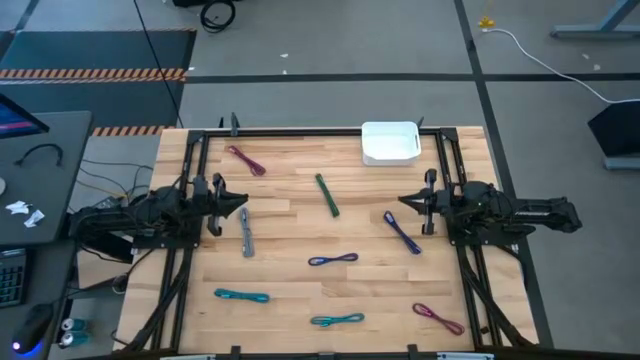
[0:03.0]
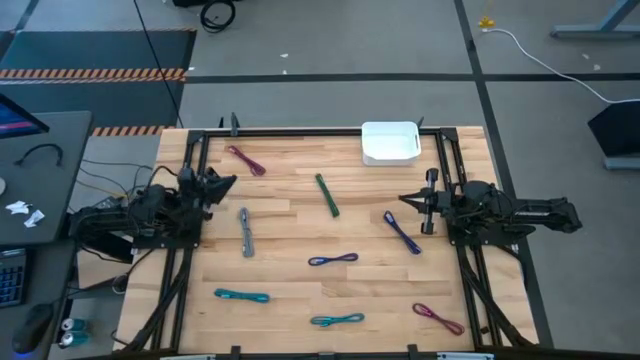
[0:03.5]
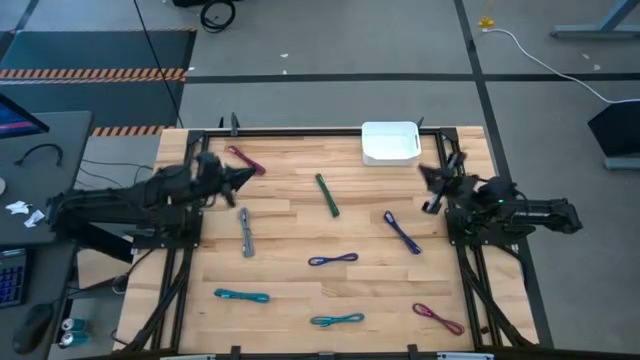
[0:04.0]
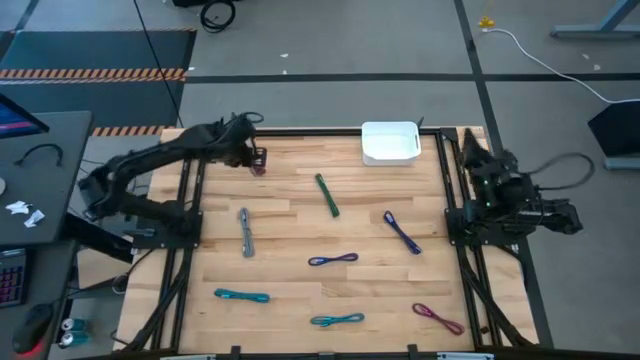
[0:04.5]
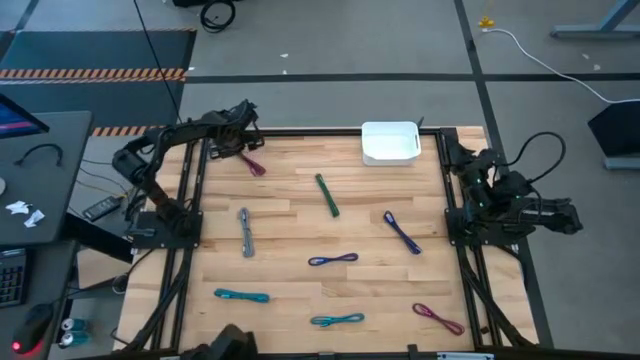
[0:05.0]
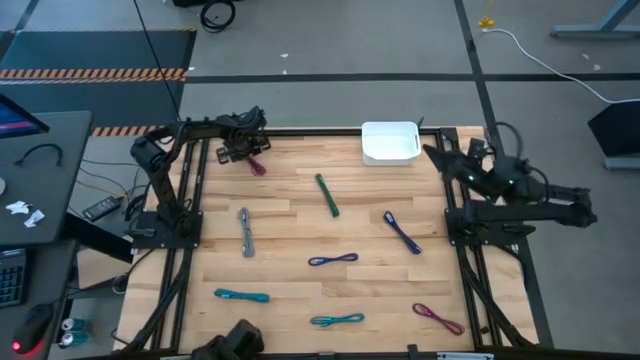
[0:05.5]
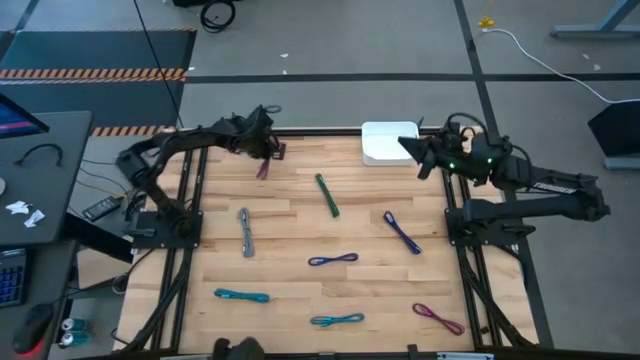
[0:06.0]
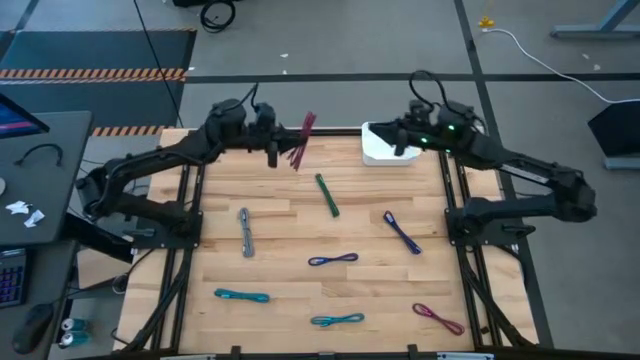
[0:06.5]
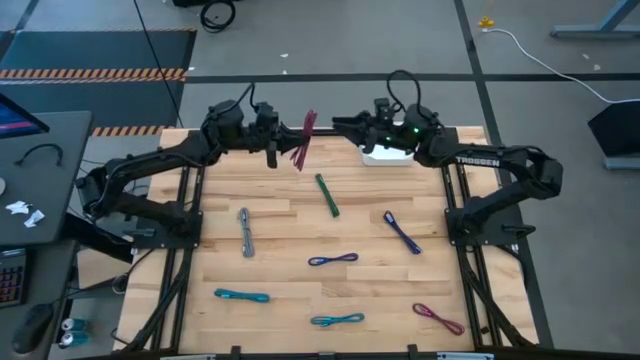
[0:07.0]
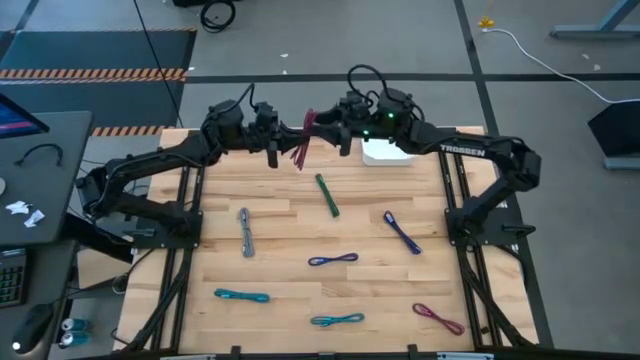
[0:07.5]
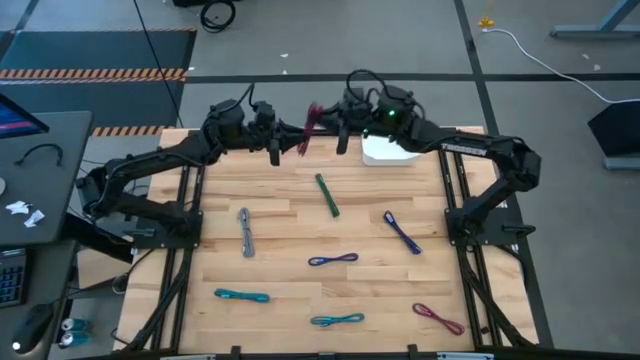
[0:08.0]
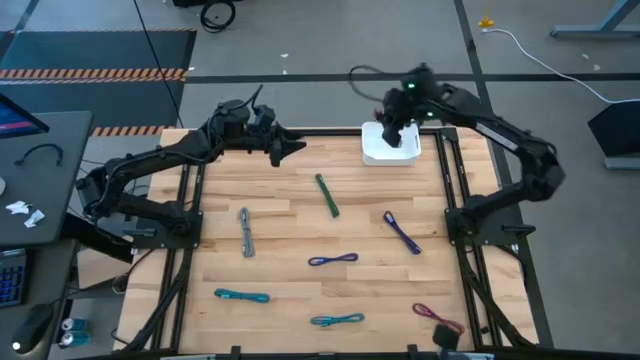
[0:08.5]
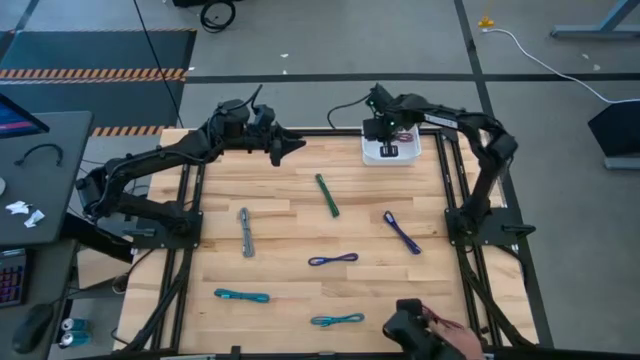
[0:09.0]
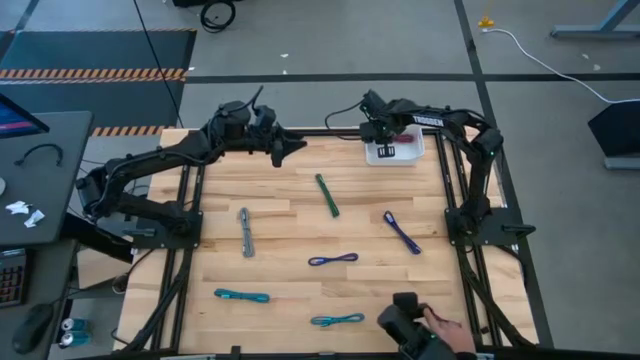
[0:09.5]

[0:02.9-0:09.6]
Task: Pick and place USB-C Cables
Put the top pink charger cable into the bin

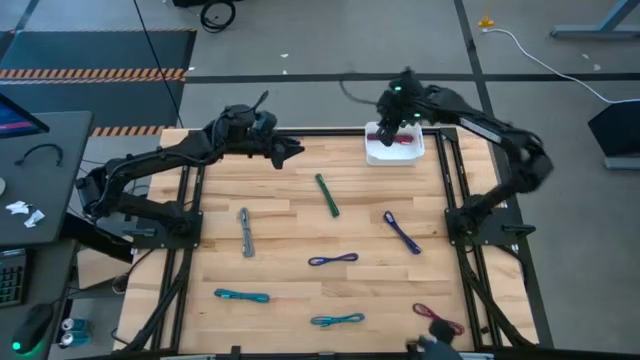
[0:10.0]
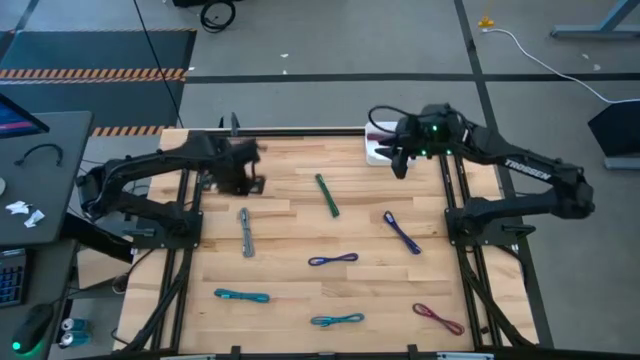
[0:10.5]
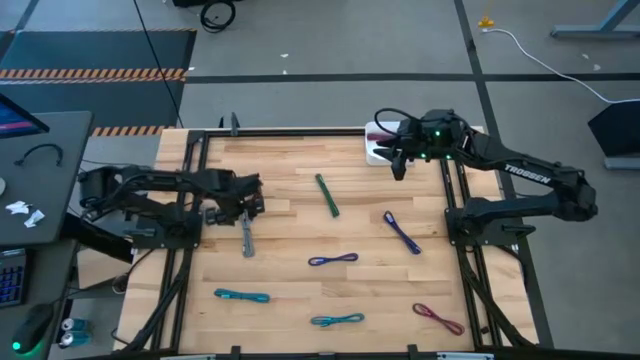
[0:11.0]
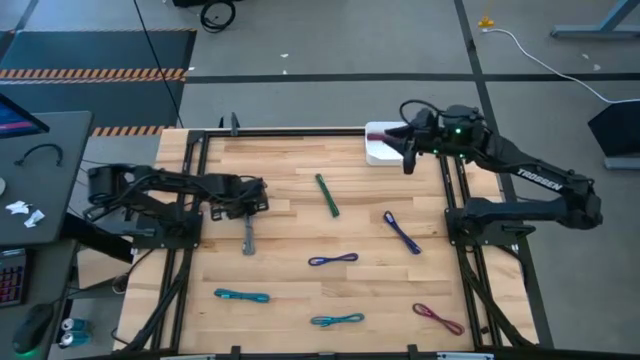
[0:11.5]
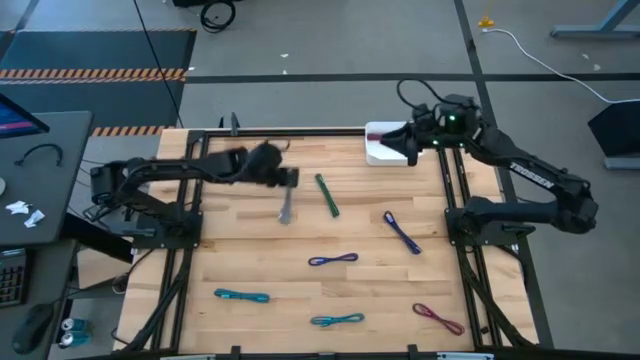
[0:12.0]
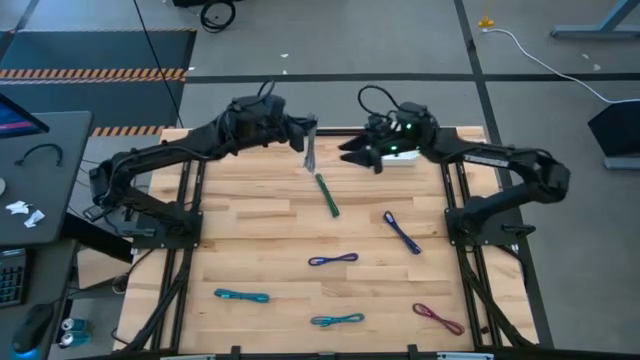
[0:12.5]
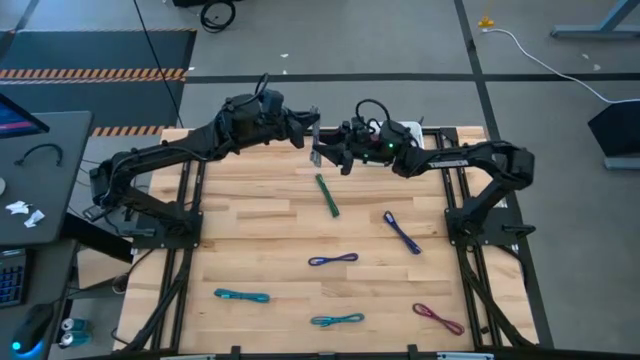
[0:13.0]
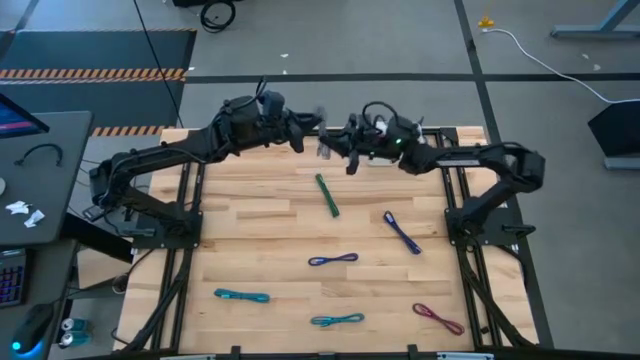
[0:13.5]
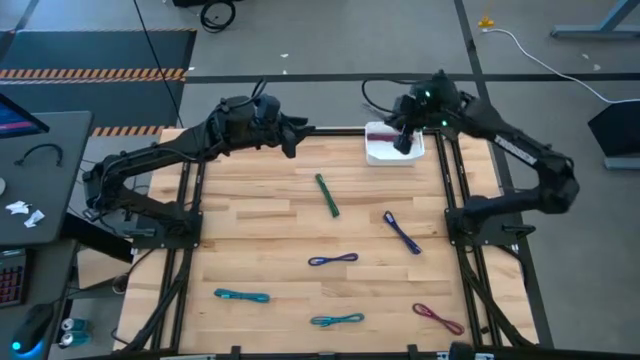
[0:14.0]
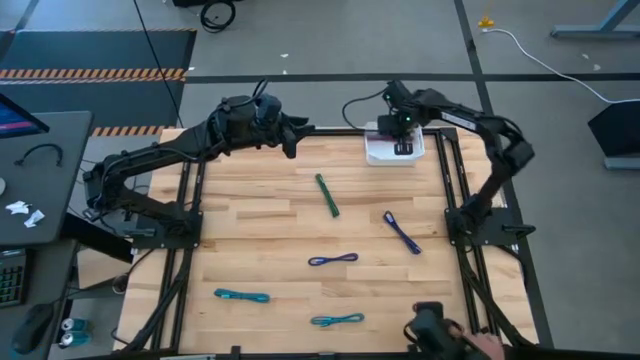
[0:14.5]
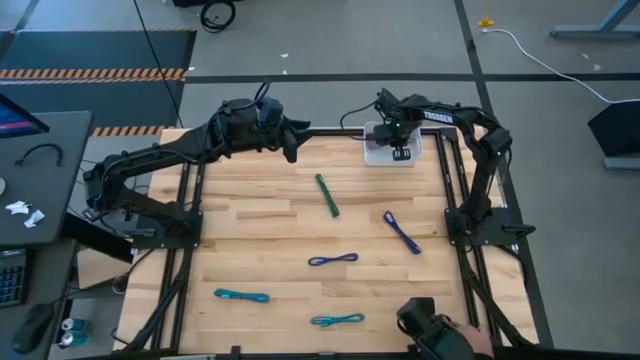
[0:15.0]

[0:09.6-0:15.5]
Put the white charger cable into the bin

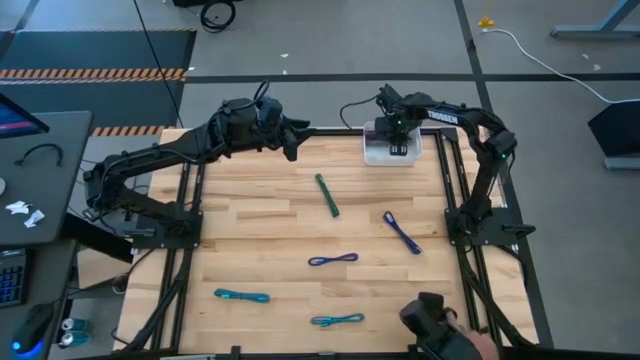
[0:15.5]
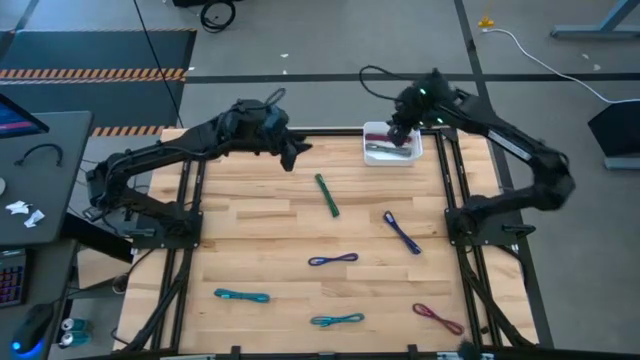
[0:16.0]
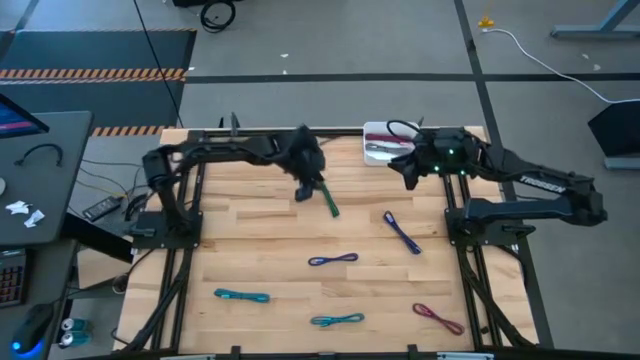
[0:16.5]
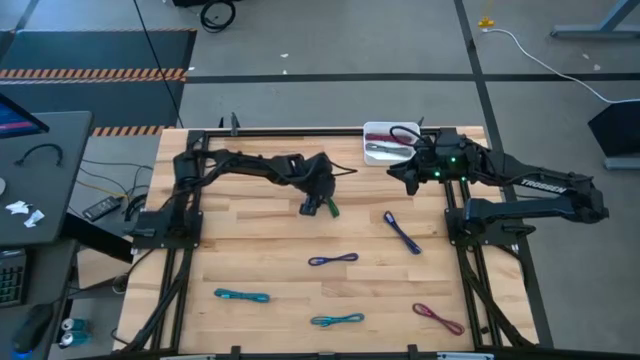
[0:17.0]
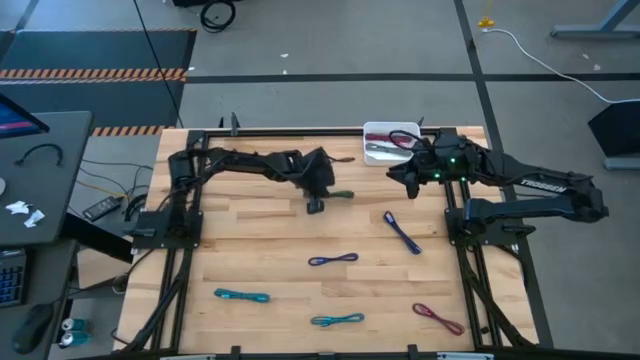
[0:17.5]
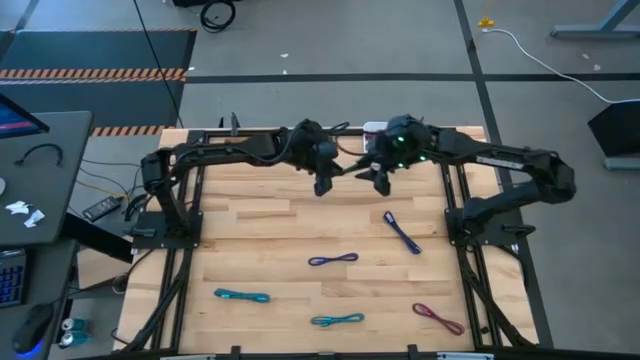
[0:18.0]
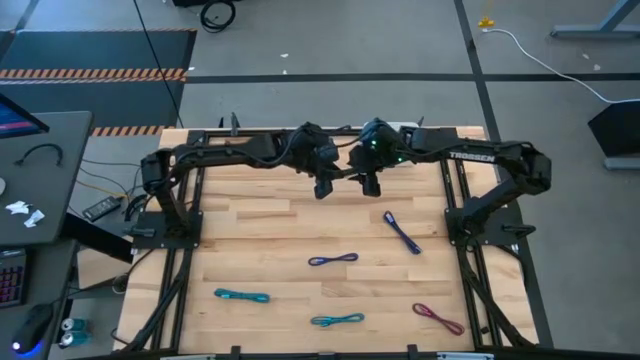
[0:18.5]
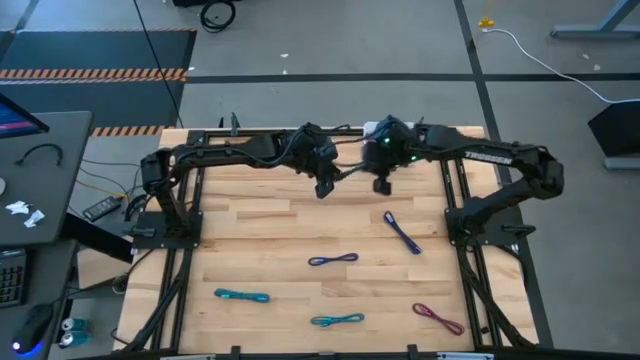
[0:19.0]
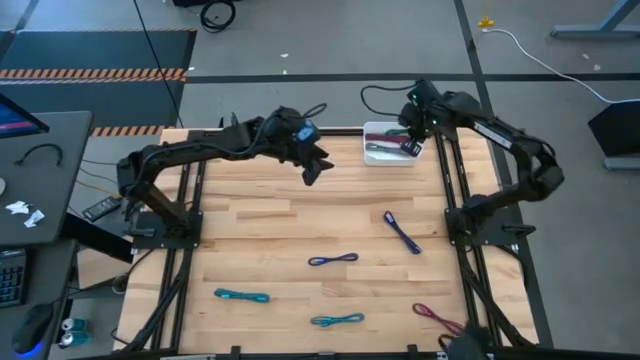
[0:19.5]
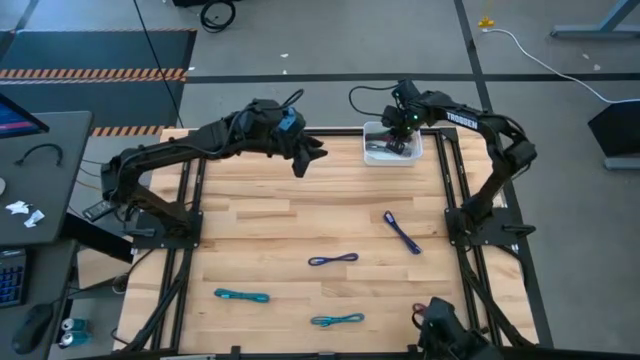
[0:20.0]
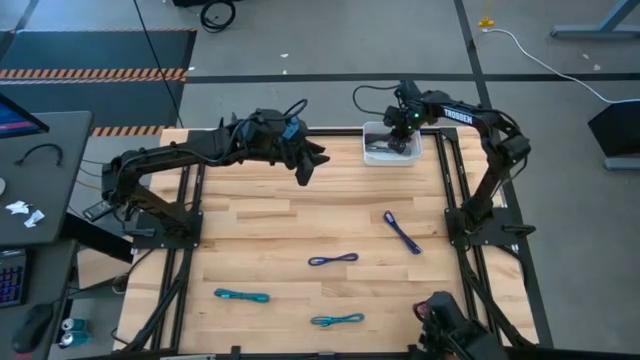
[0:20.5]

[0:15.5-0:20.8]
Put the green charger cable into the white bin

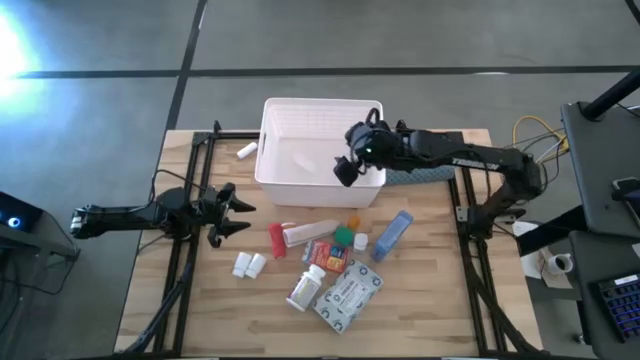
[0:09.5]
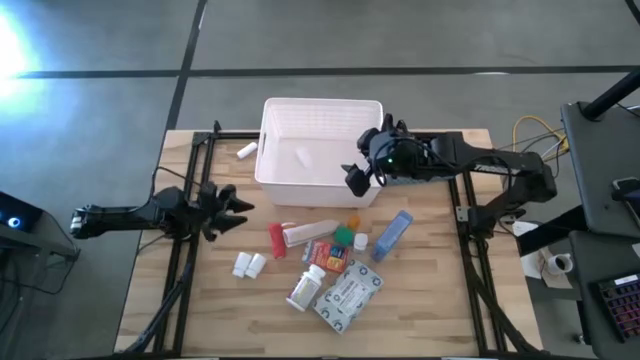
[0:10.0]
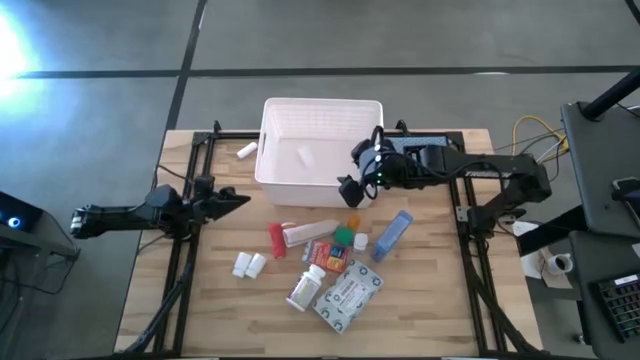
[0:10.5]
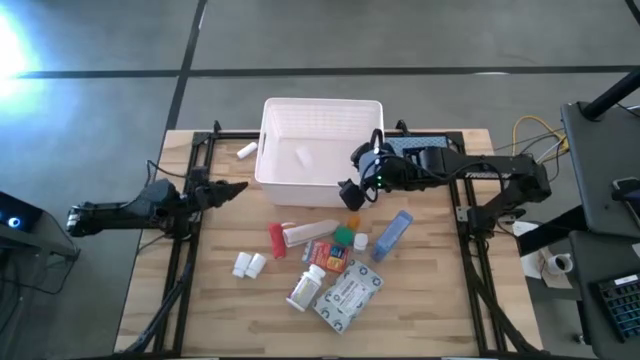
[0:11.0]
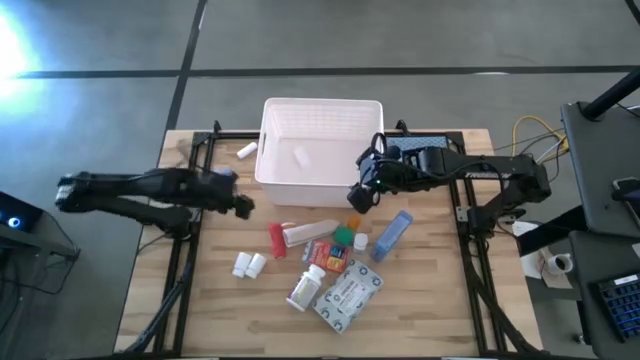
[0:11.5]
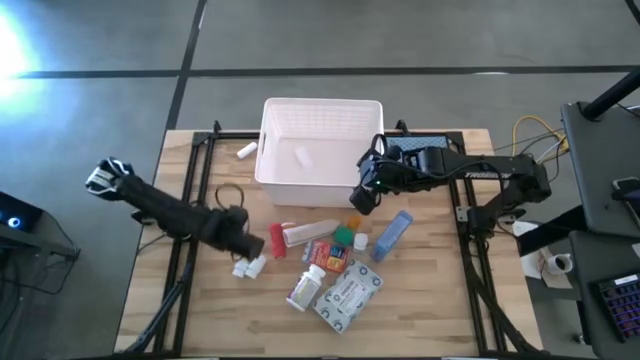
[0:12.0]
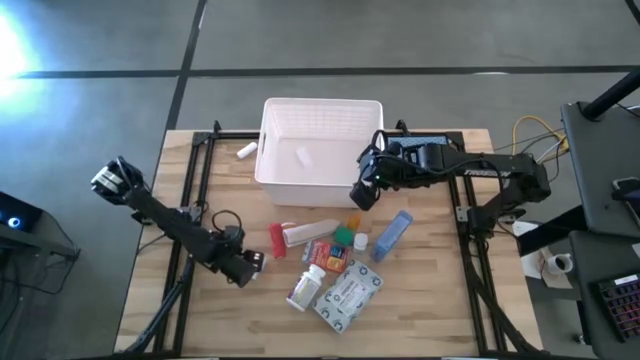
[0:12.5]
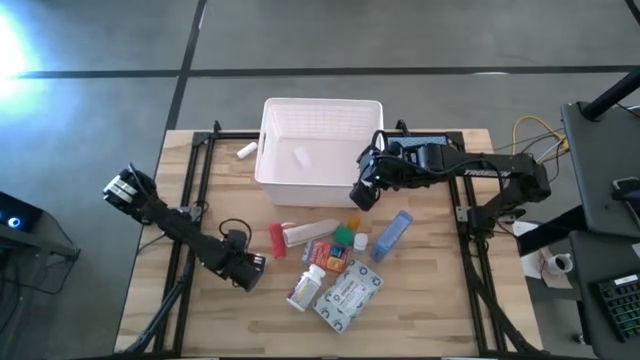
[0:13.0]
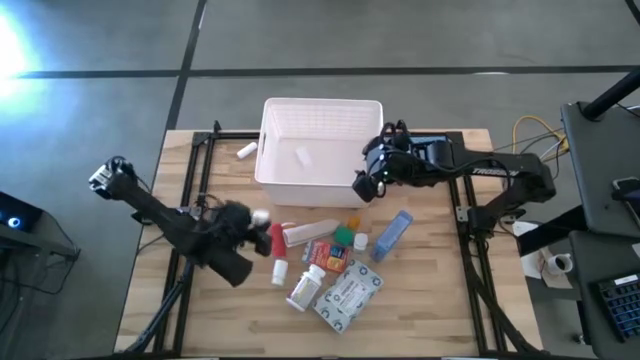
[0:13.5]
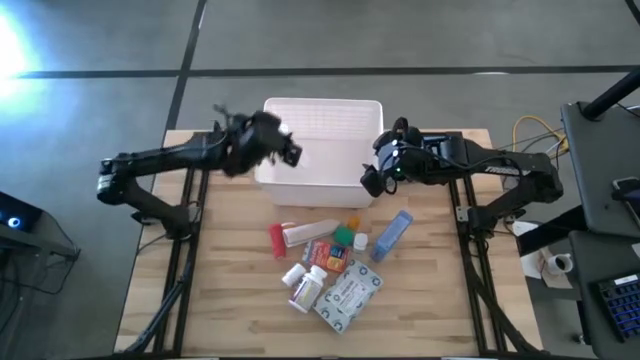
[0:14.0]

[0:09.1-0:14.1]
Task: Pick & place medical supplies in basket/bin
Put the left white medicine bottle into the white bin
